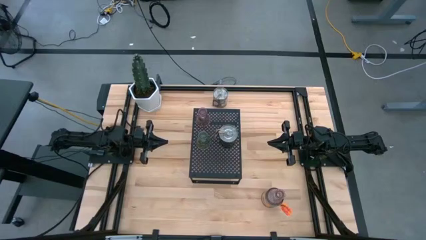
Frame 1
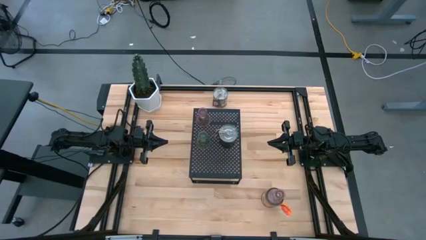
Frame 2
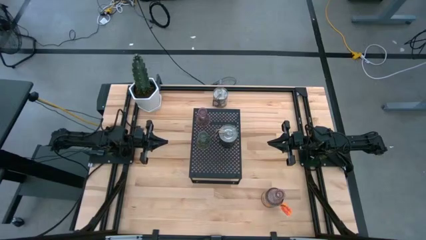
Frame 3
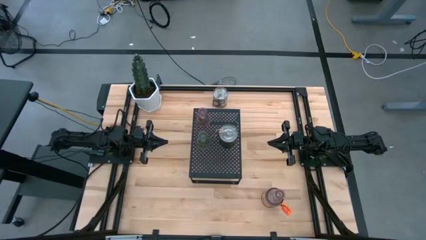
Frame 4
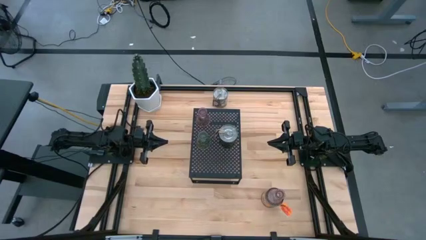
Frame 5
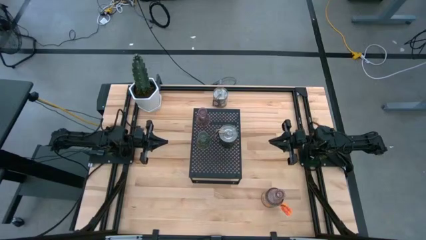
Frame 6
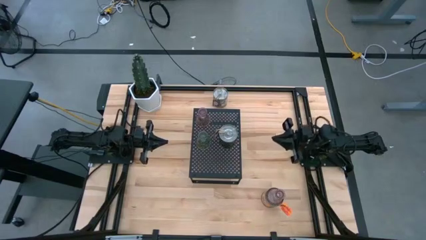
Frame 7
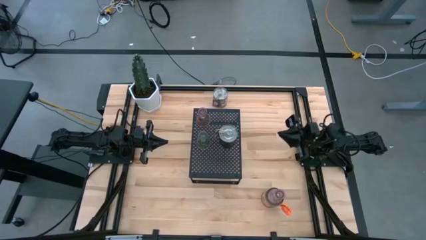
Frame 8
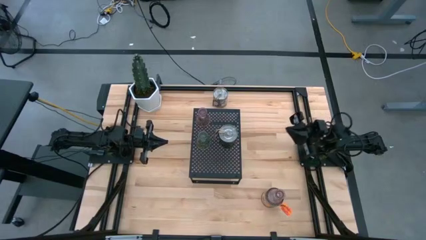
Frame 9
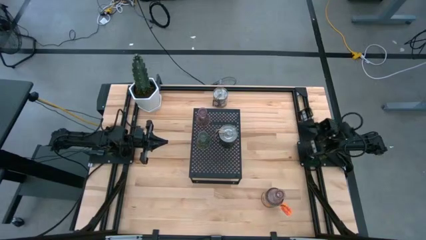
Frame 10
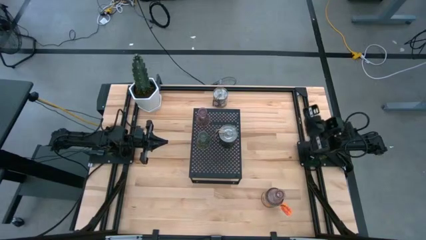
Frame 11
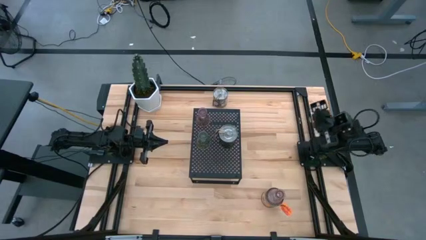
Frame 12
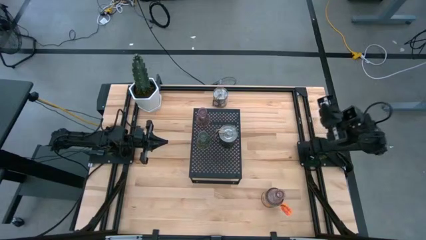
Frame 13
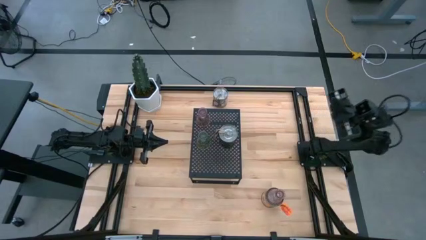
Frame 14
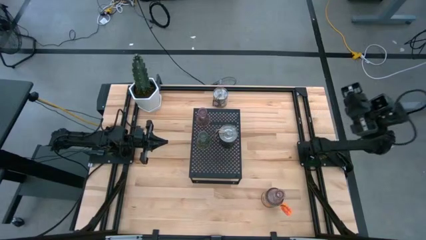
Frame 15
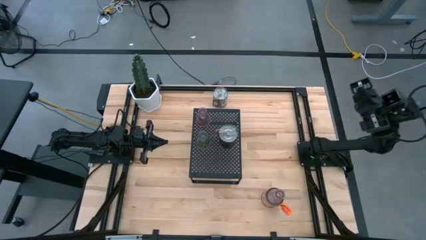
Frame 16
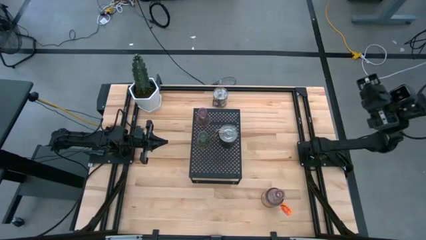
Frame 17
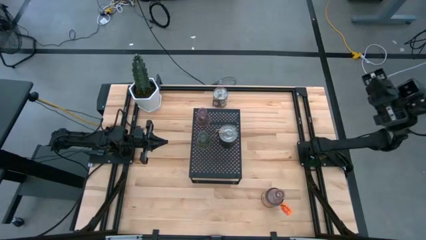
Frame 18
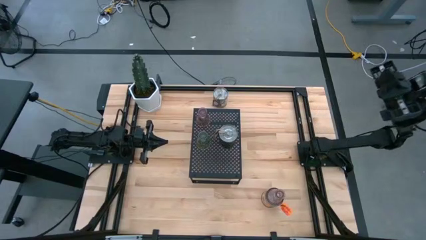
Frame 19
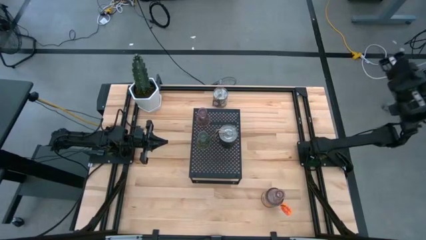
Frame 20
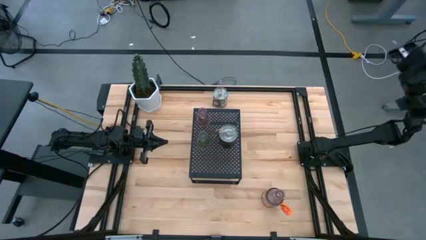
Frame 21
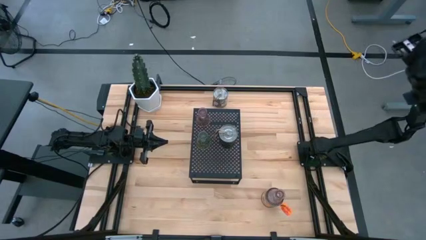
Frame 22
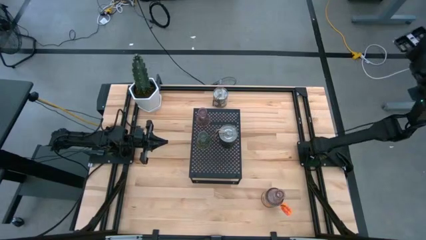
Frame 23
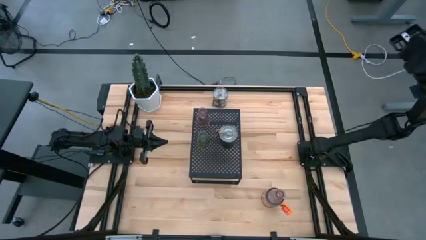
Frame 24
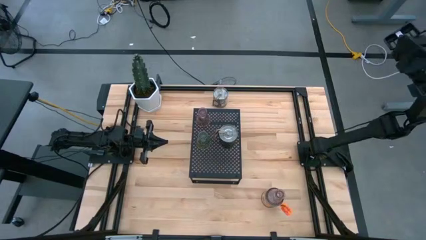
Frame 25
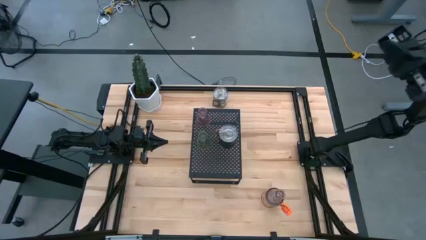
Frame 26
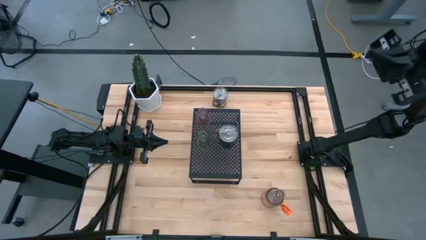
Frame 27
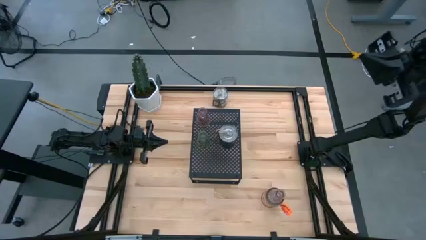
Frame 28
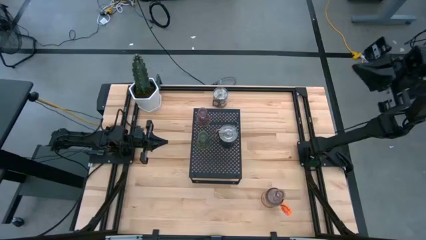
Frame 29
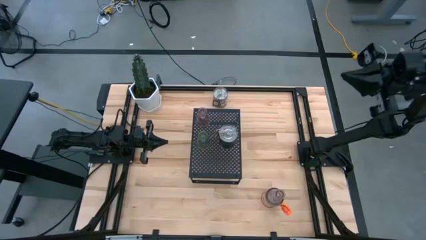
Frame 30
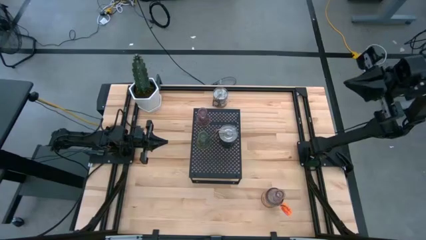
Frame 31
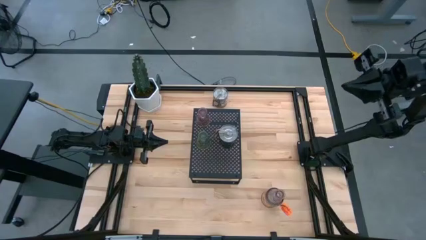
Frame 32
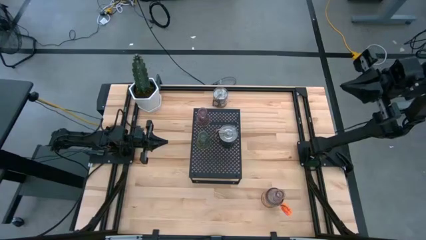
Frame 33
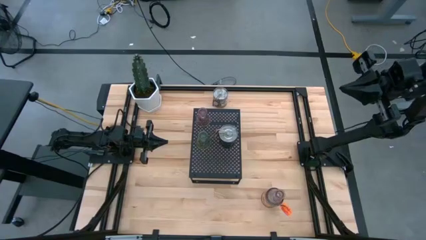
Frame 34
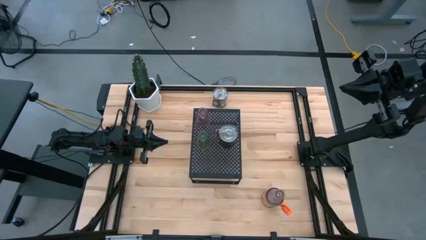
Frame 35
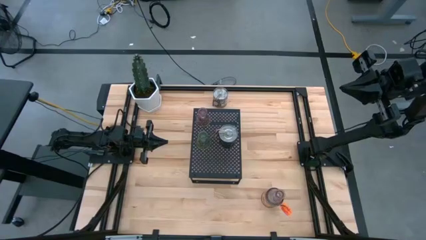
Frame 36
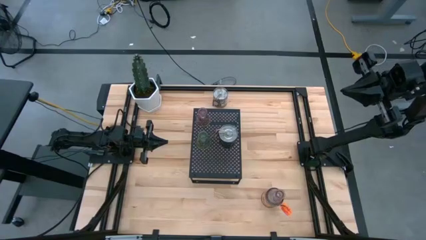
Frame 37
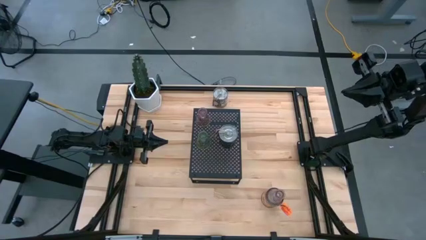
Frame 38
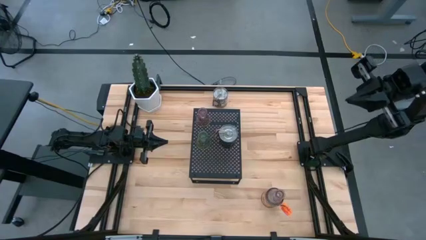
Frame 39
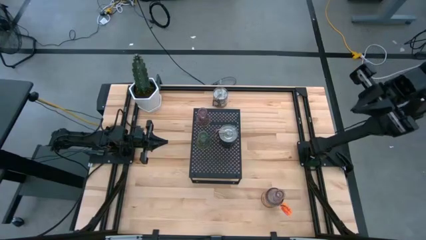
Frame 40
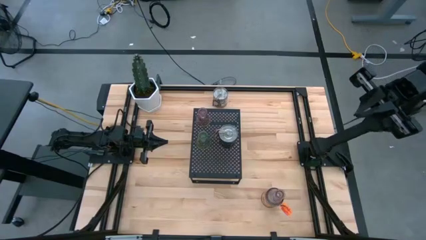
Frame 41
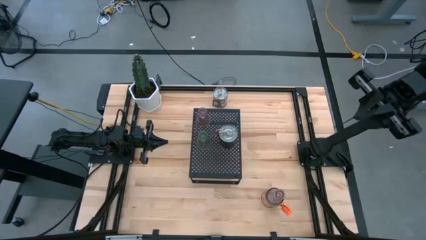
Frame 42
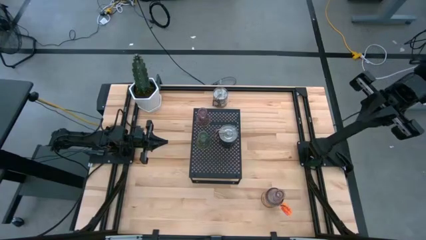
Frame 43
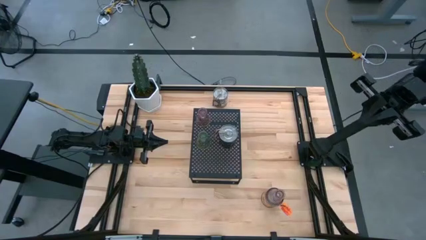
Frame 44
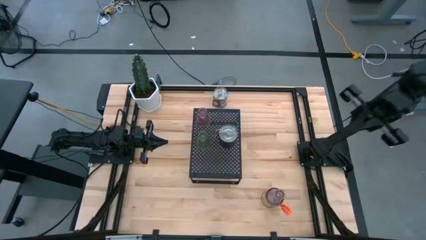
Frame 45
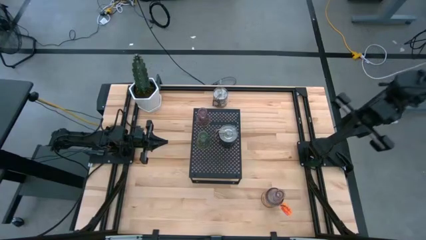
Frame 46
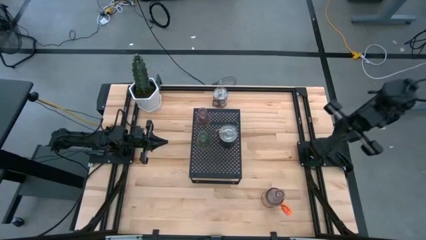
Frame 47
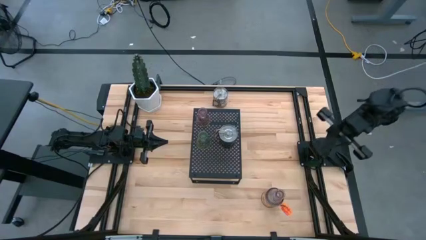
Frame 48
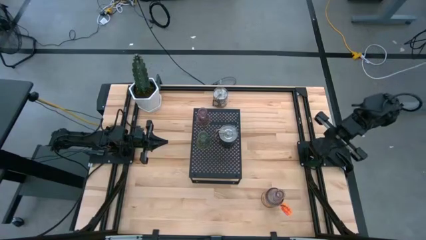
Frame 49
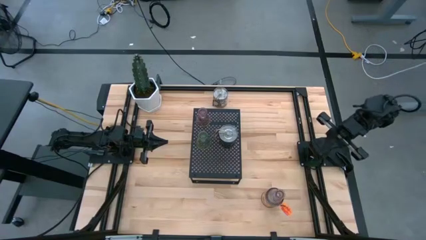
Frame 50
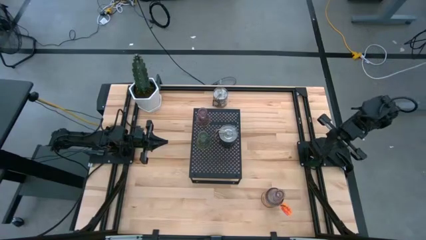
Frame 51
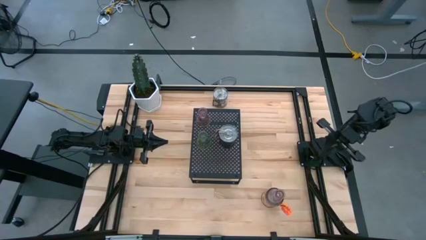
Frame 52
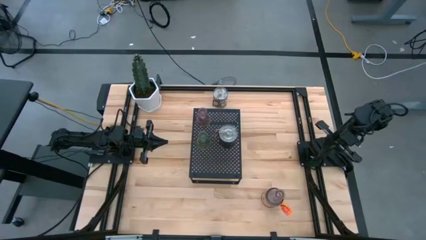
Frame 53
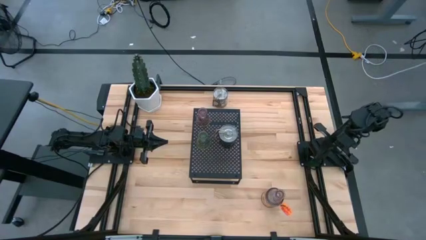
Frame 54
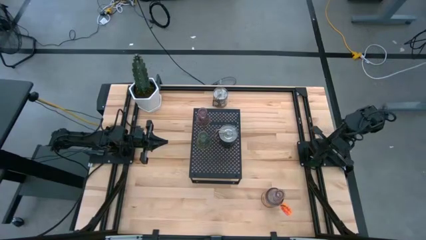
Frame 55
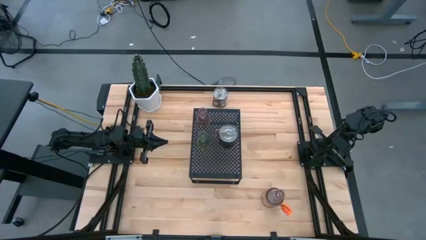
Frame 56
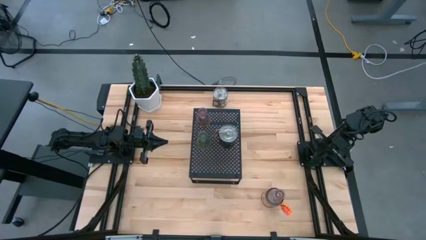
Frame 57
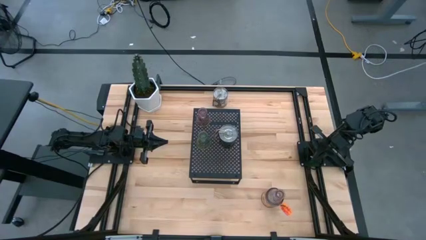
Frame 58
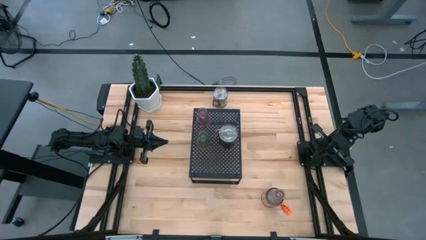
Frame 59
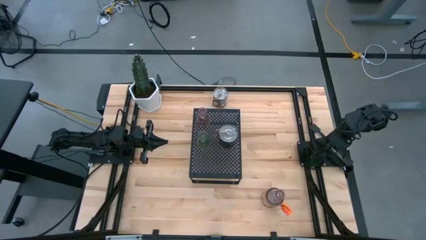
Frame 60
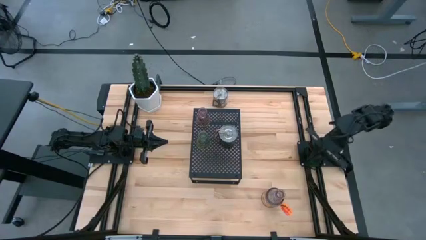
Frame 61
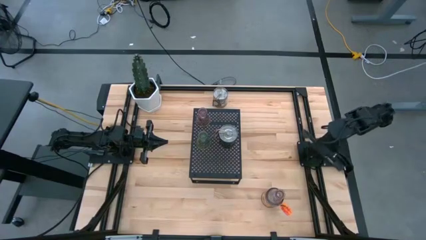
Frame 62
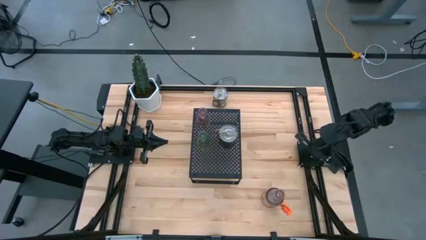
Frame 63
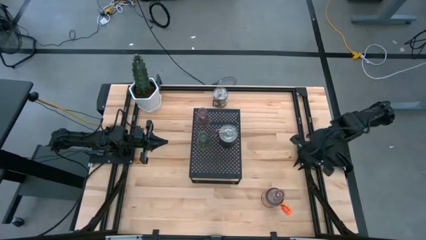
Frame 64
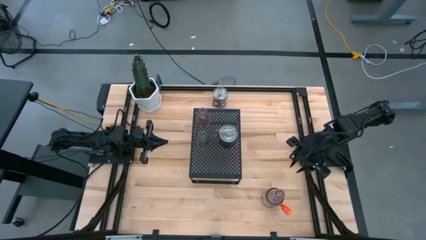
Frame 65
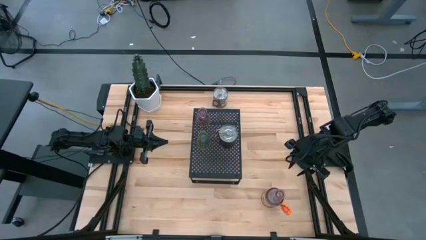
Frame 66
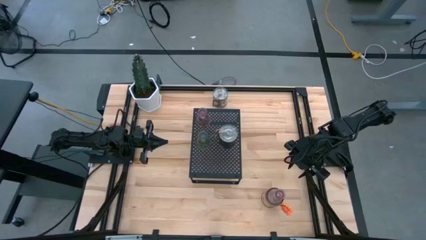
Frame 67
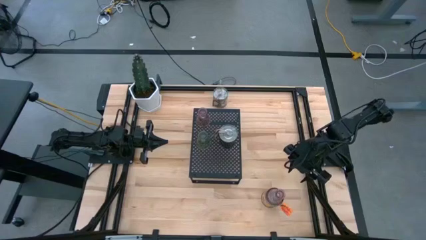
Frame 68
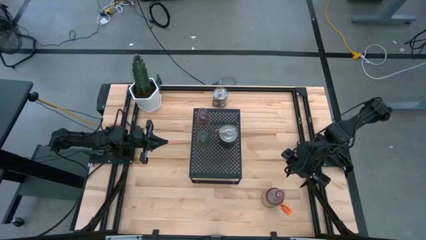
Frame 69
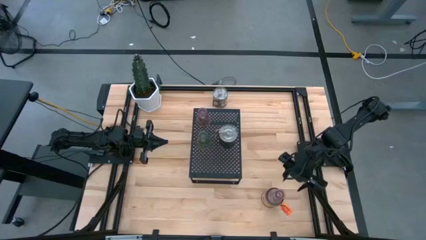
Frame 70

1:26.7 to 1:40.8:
Task: Pick & Place candle stick holders
Put the pink candle vase on the shelf

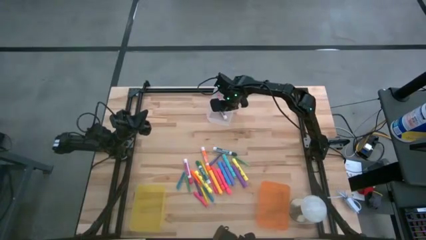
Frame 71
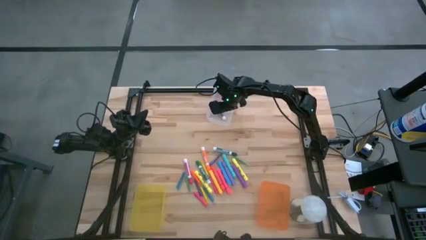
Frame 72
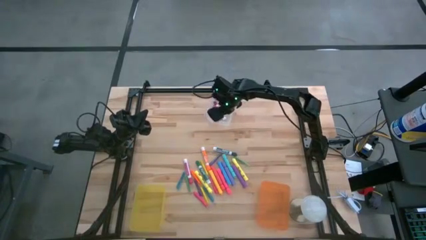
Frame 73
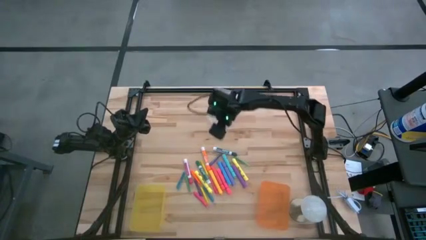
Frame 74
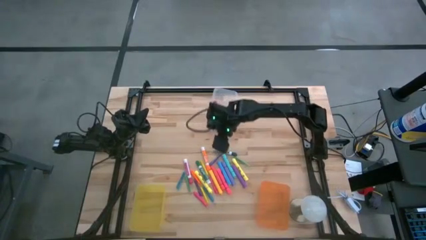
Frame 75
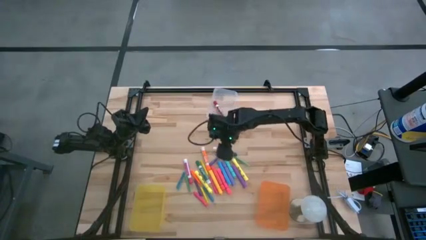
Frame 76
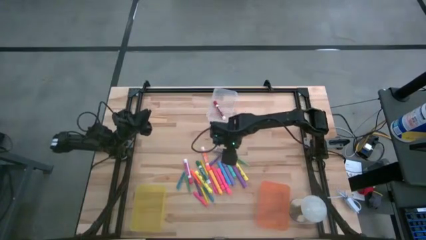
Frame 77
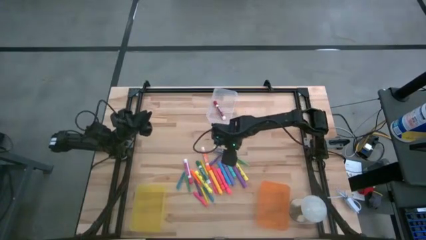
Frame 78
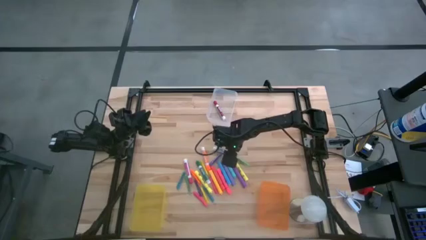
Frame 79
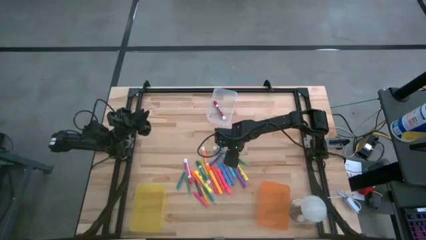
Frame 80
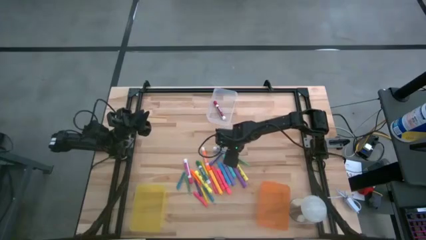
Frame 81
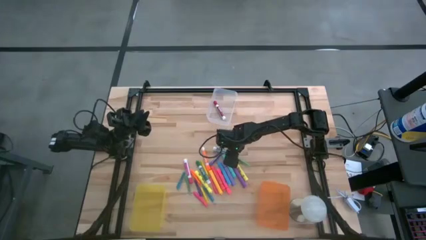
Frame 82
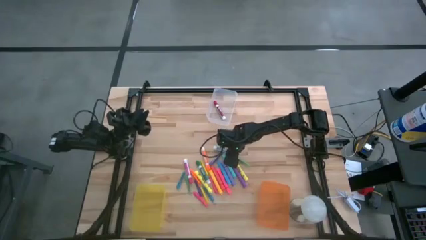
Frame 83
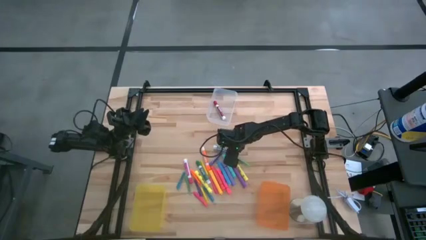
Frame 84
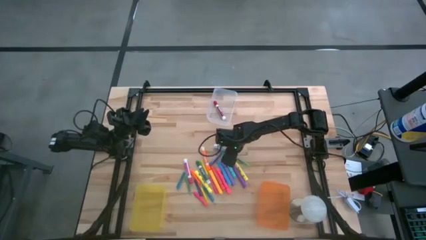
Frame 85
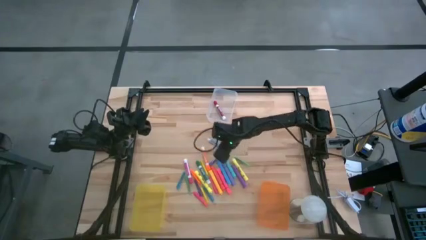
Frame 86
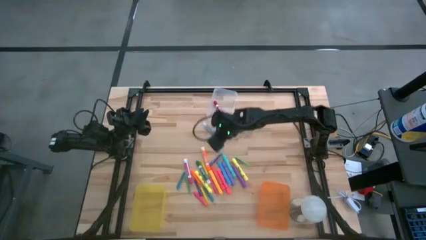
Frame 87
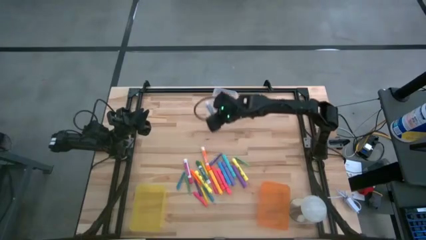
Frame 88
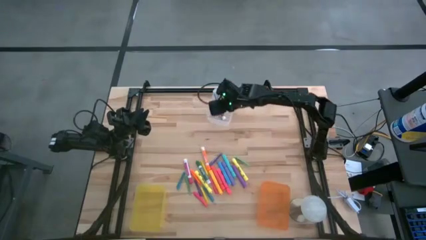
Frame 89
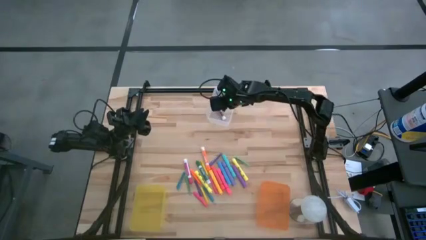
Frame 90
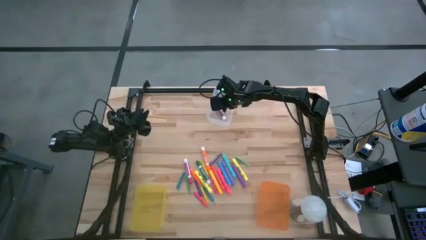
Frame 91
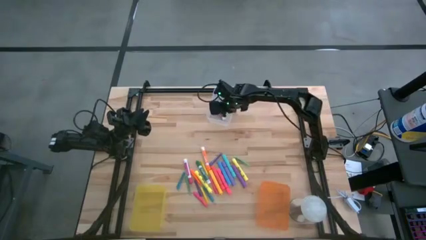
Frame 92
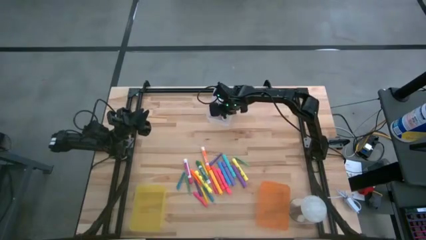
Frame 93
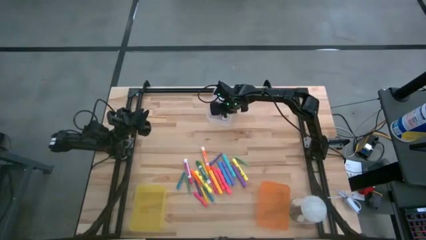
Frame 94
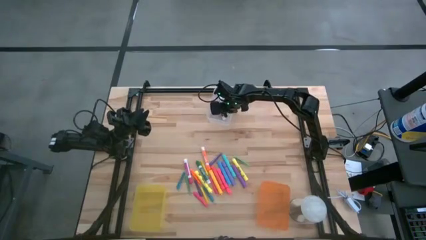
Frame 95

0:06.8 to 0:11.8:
Task: Pick & Place Markers
Put the top green and white marker pen into the white bin
